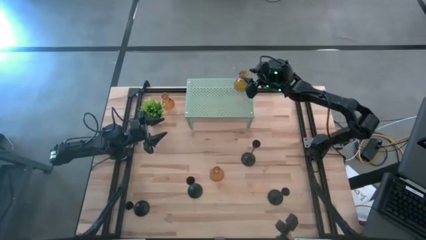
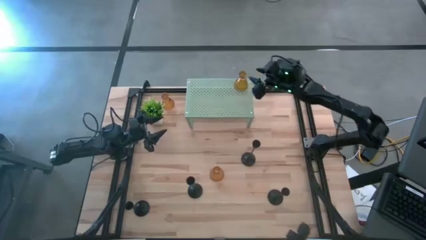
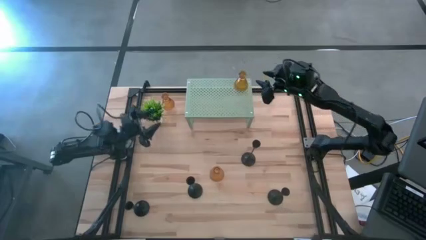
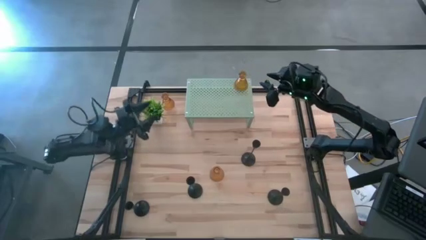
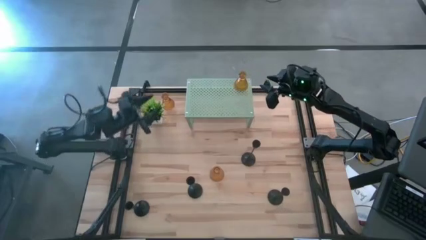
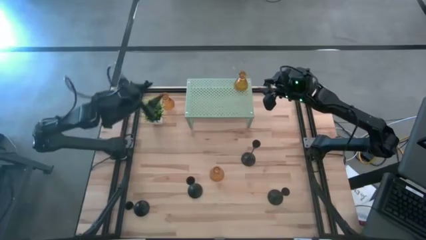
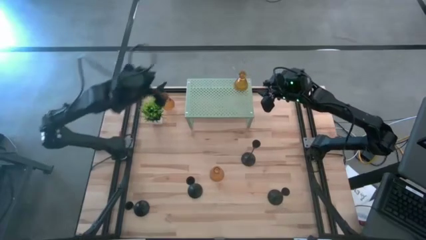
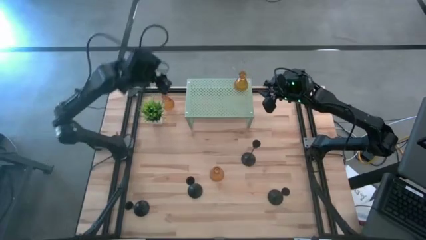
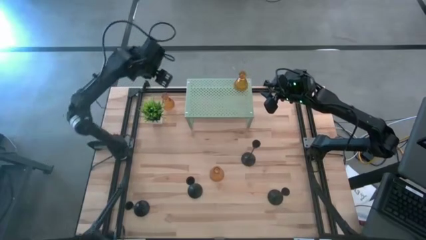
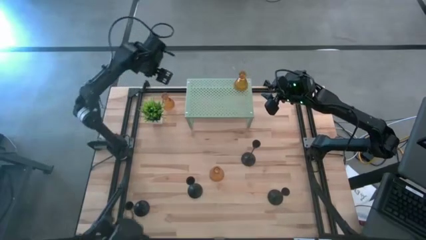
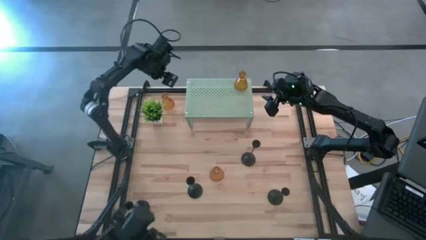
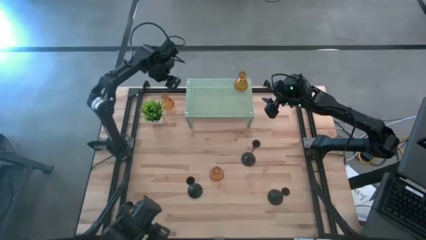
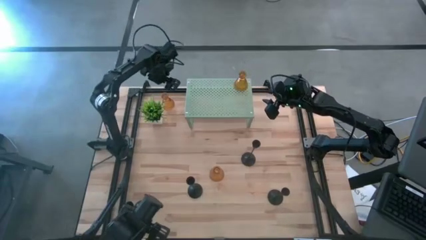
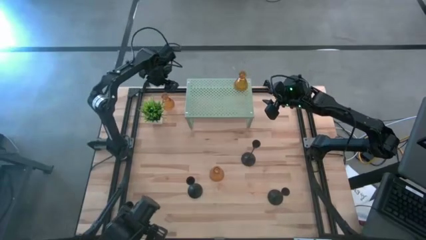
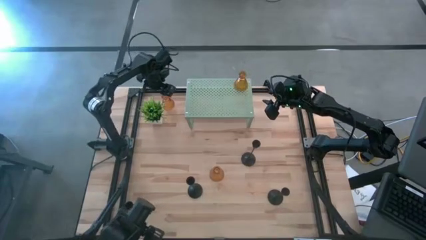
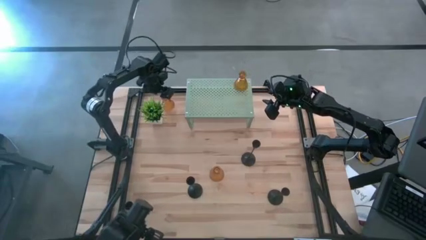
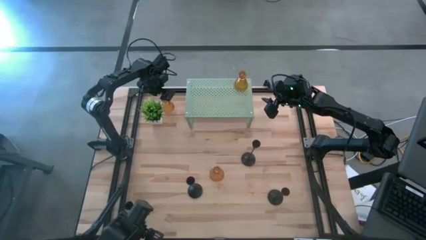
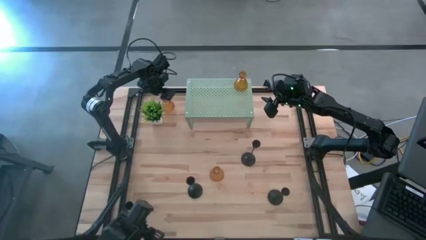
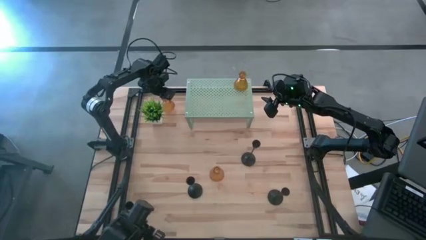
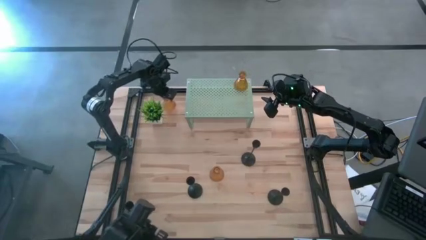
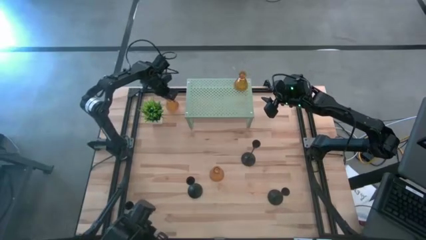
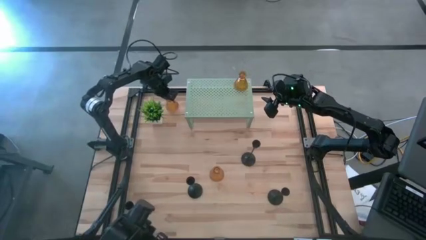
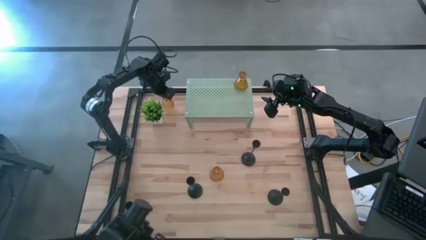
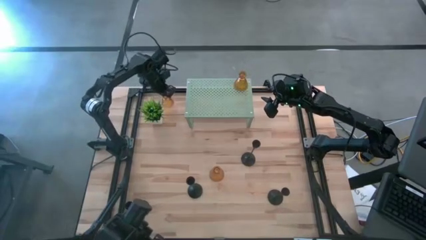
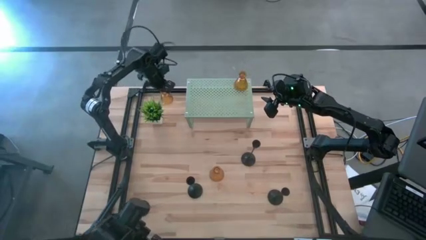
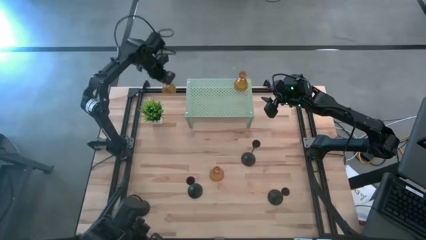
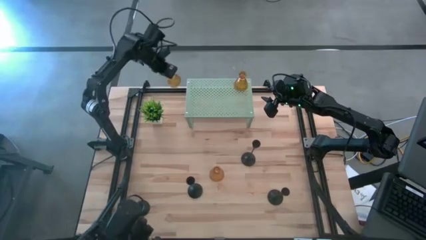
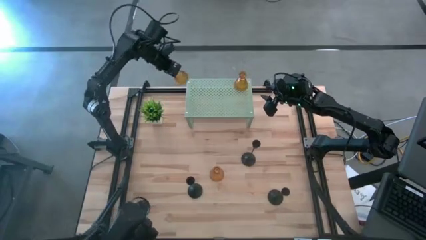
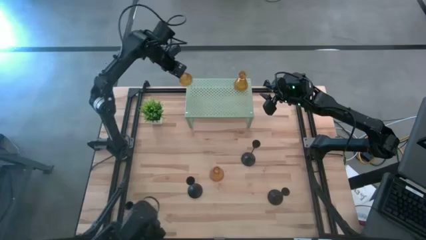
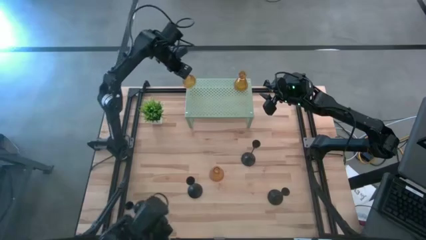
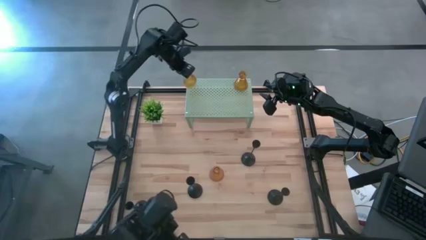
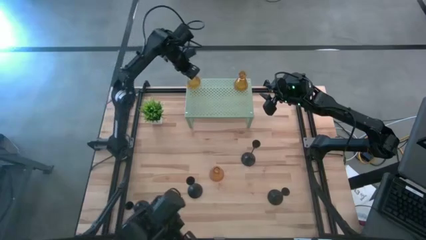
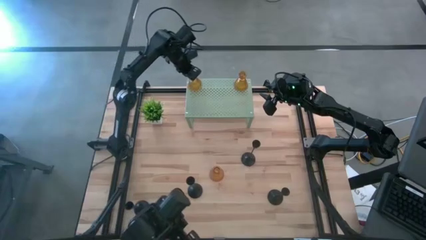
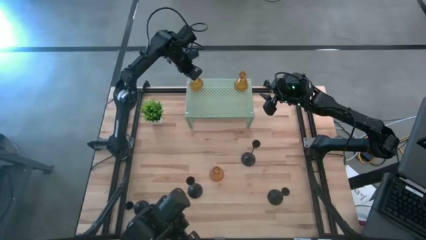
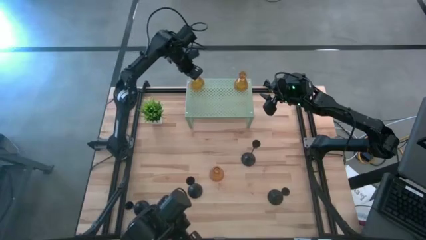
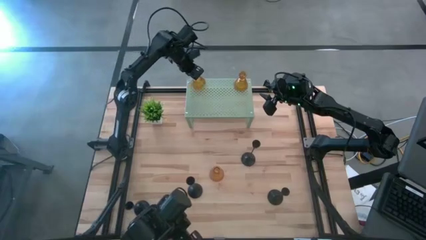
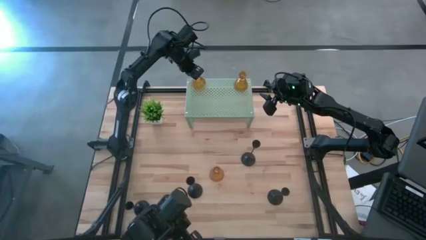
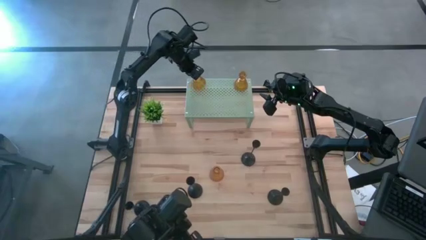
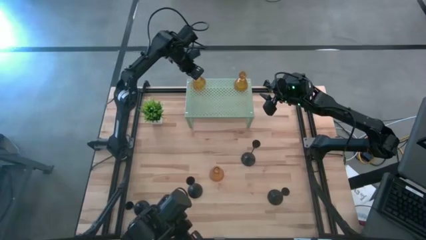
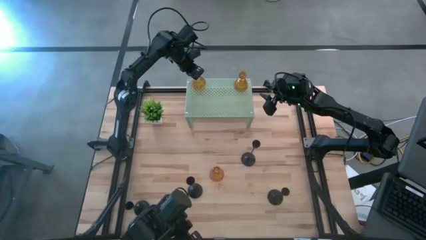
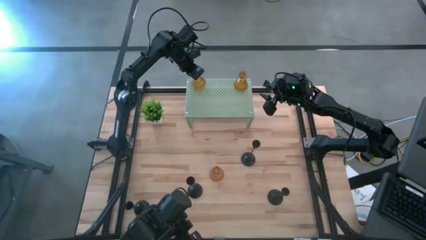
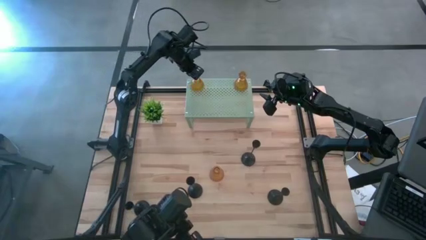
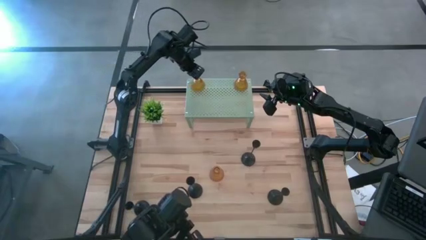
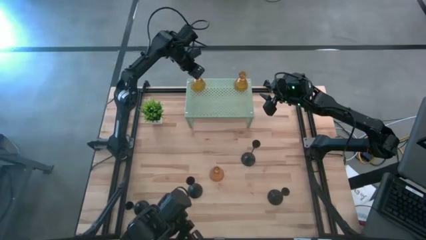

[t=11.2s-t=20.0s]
Task: Pick & Place candle stick holders
Put the yellow glass candle holder on the shelf

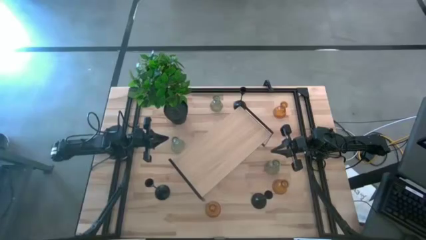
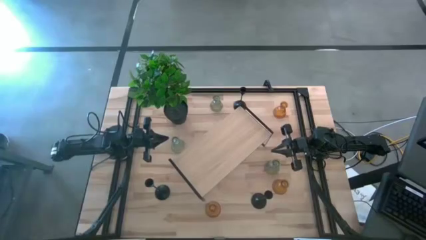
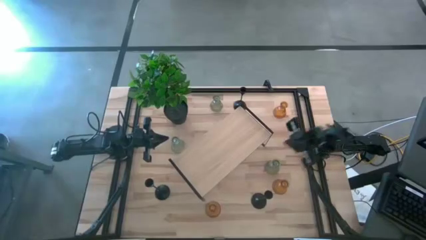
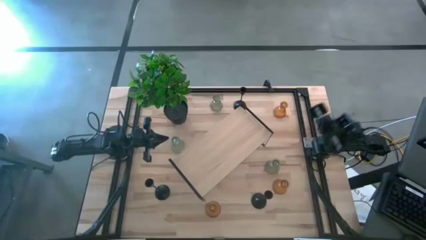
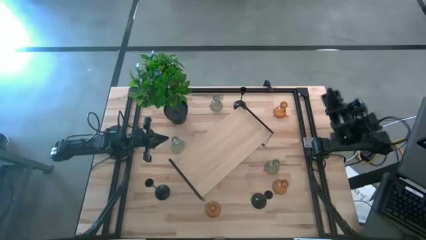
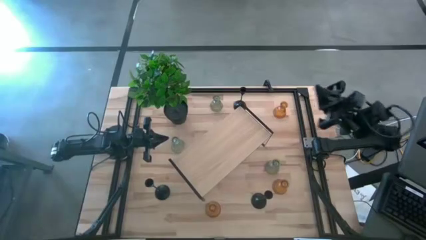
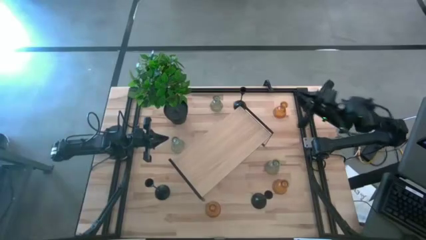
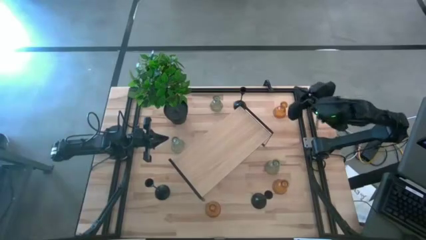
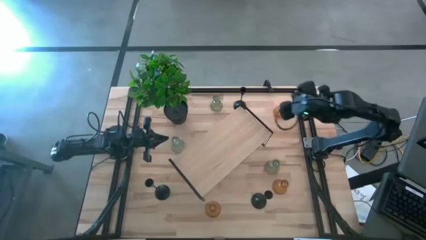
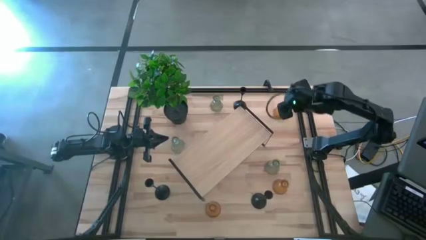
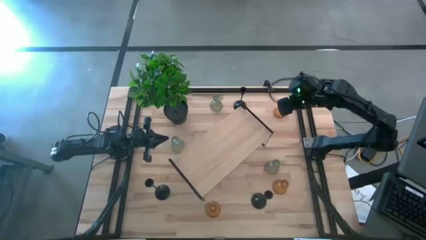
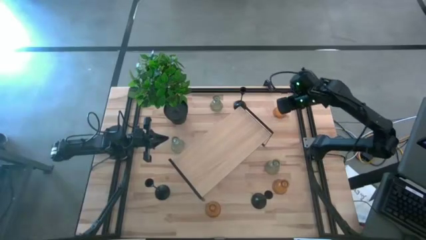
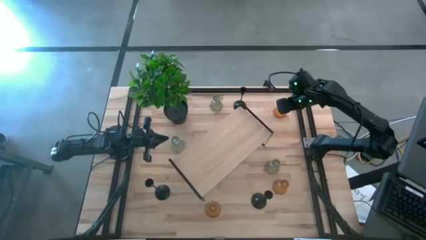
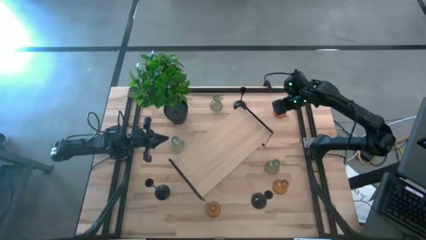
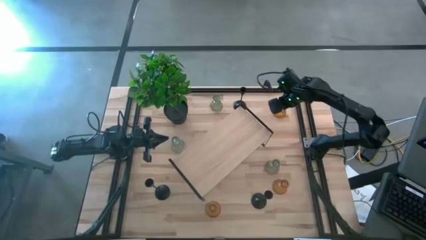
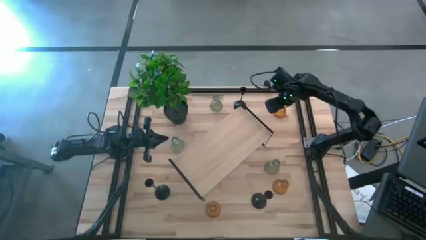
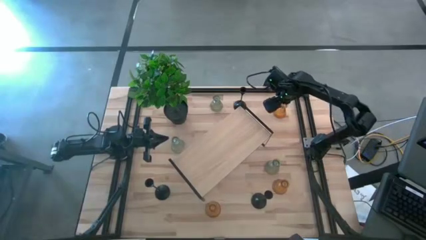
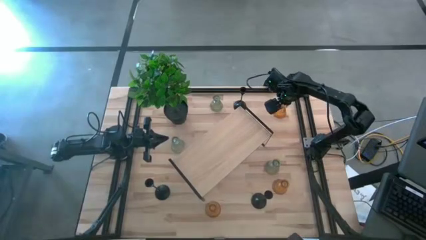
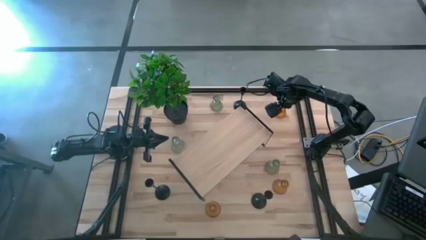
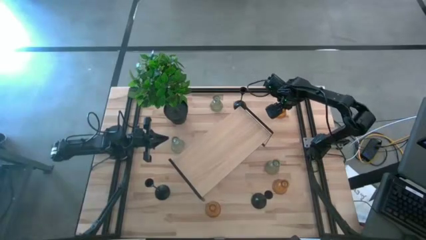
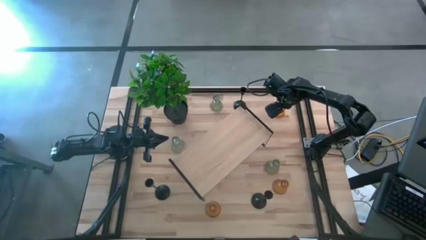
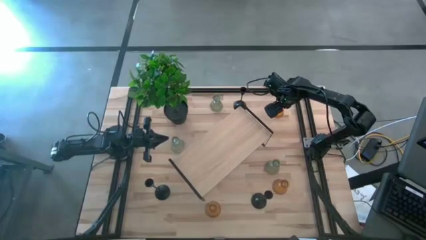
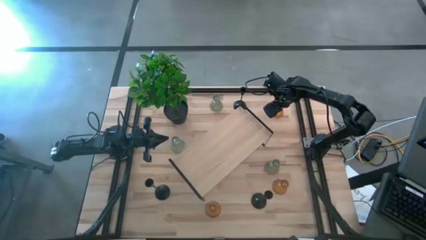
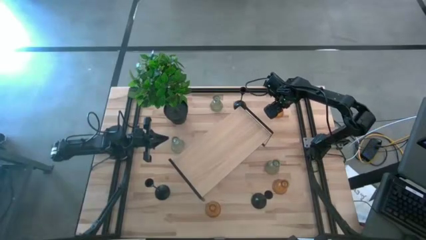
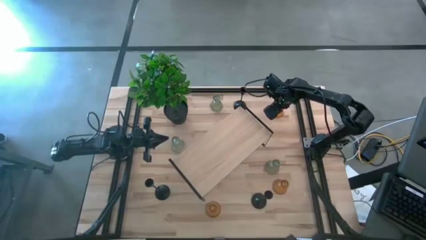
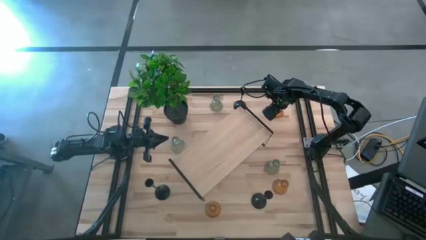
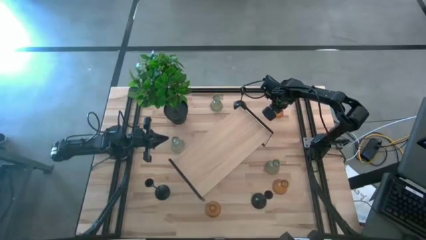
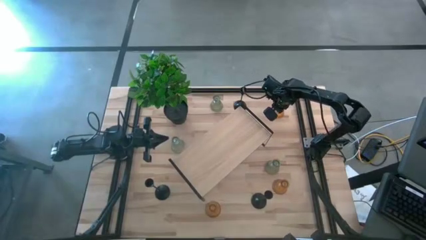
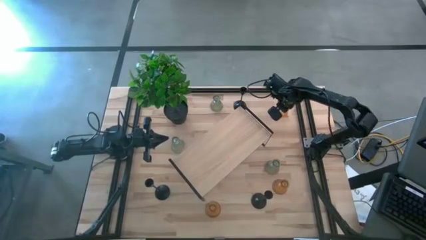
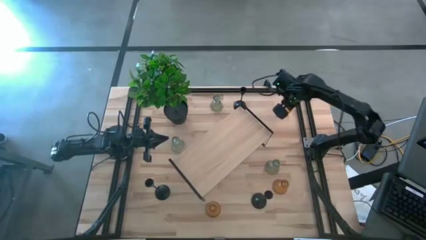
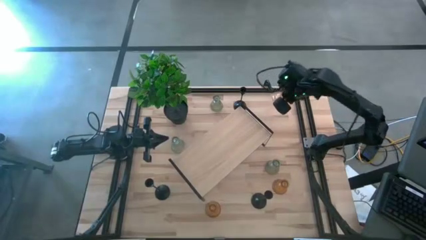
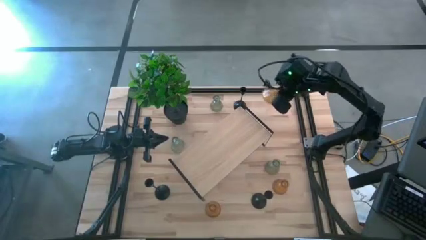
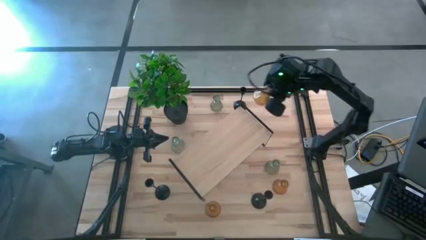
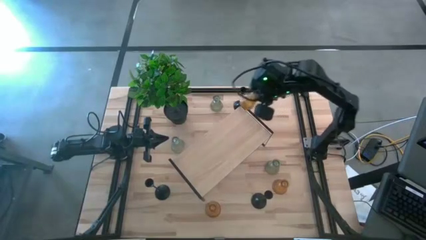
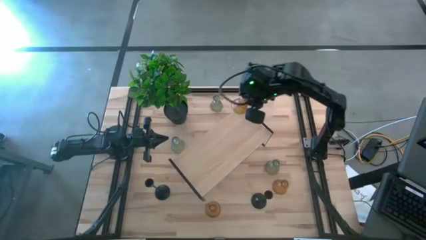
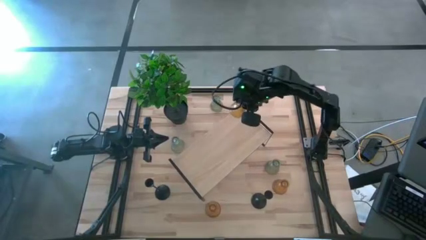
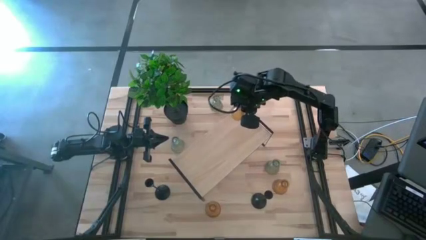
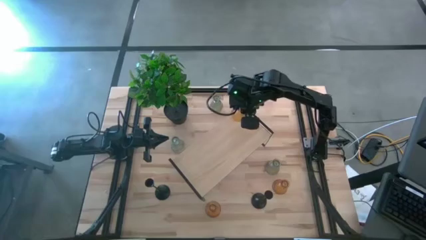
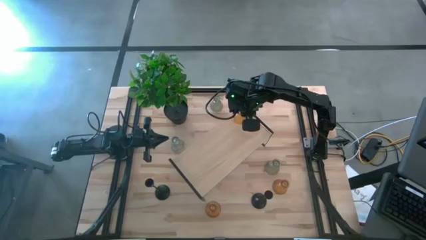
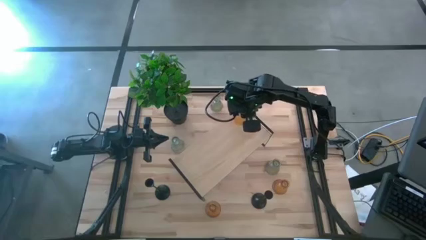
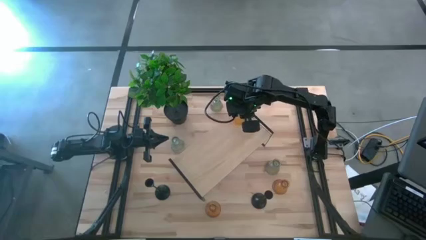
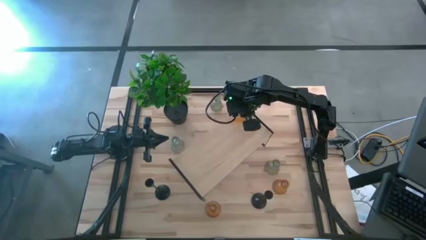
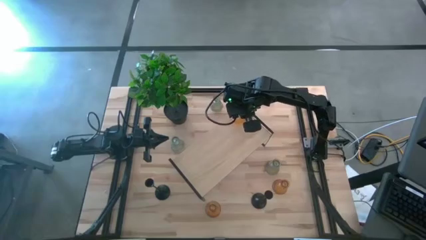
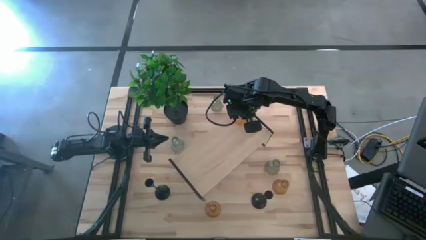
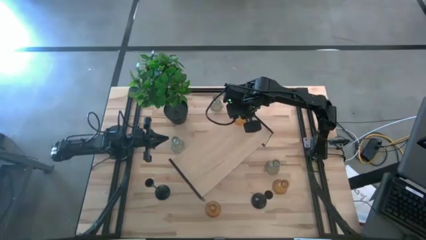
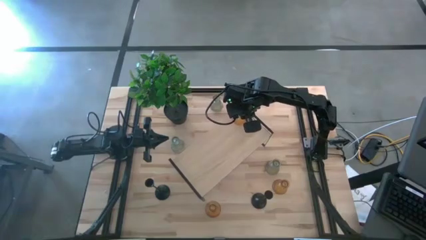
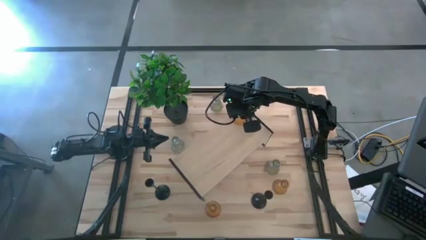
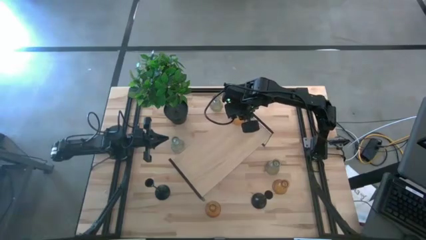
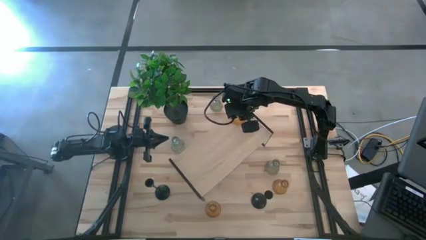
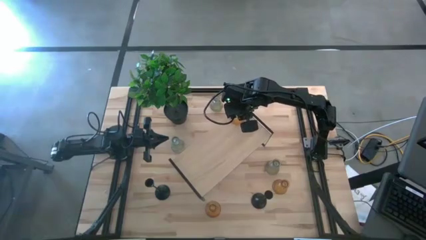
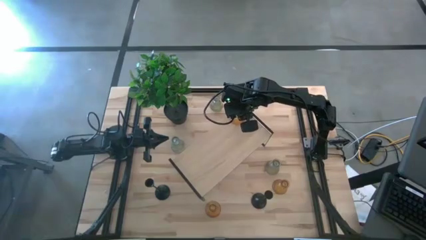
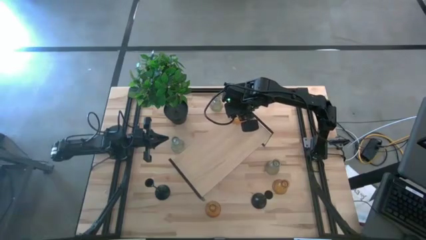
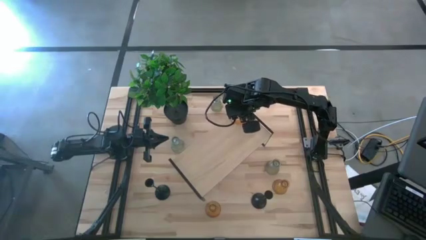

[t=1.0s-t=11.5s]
Task: Pick & Place candle stick holders
Put the top yellow glass candle holder on the shelf
